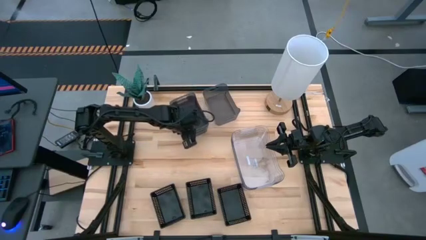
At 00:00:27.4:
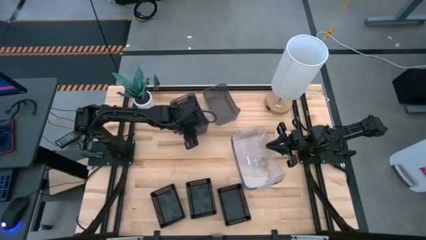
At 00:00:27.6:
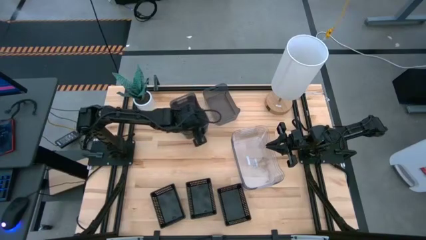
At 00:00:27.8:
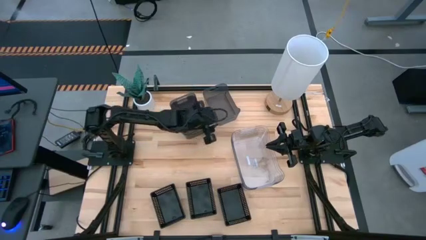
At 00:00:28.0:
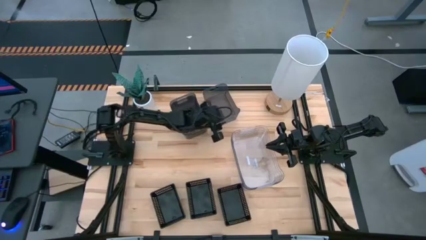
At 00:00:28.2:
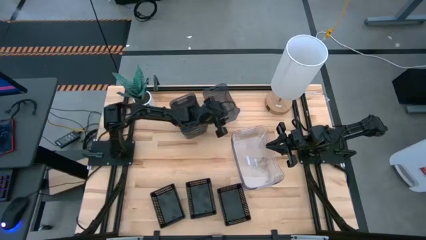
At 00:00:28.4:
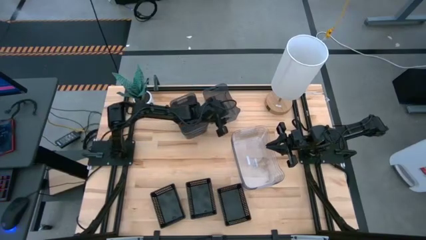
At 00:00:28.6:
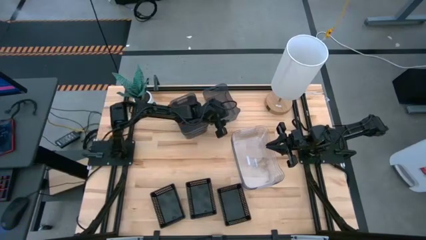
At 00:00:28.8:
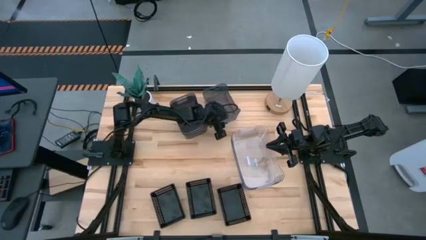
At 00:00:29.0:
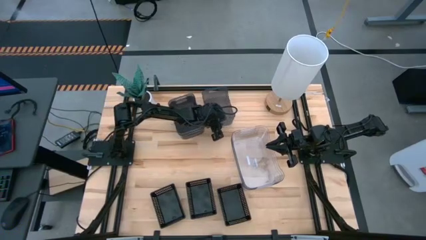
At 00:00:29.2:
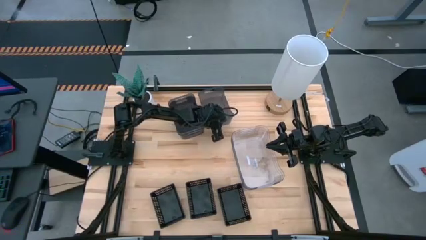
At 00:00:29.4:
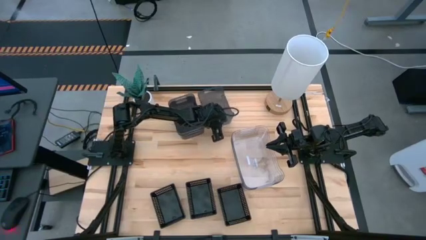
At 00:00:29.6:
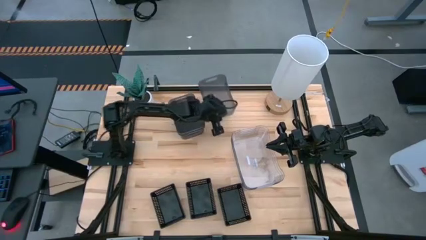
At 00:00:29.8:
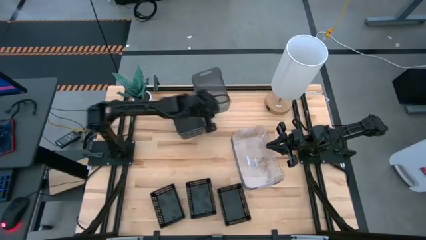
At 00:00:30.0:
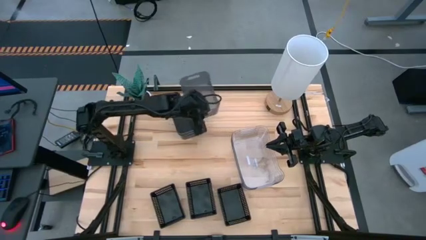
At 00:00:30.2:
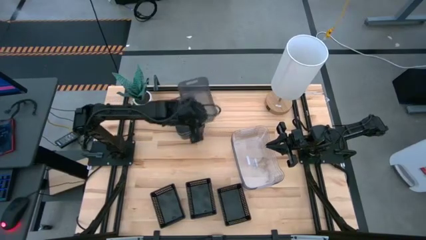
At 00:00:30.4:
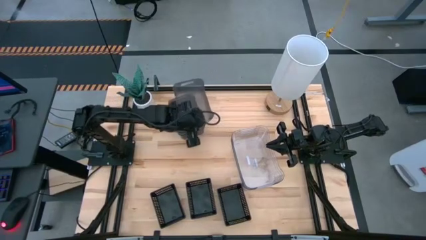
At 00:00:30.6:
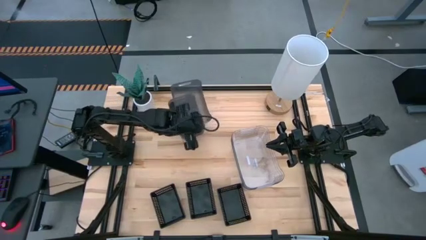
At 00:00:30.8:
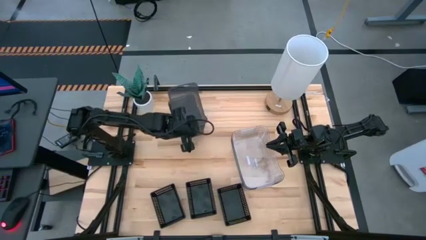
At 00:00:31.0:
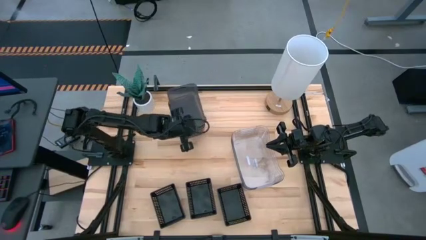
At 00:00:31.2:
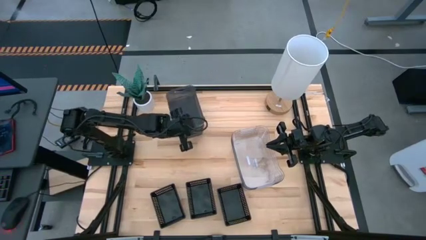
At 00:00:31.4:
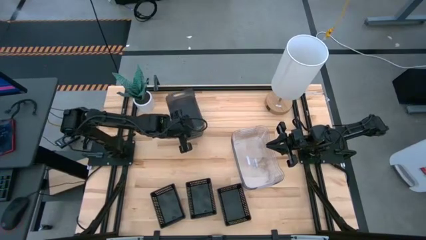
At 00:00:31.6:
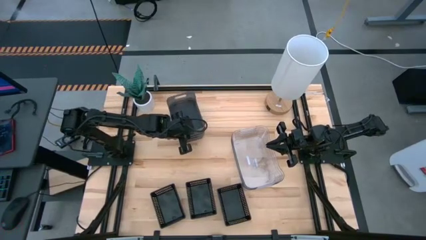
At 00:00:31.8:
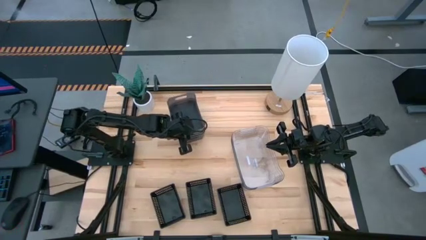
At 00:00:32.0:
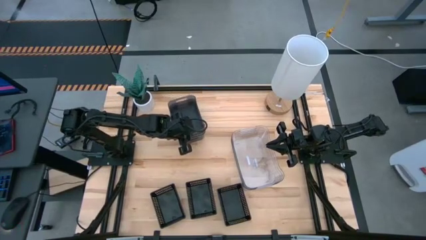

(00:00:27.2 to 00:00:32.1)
Stack the right gray bin on the left gray bin

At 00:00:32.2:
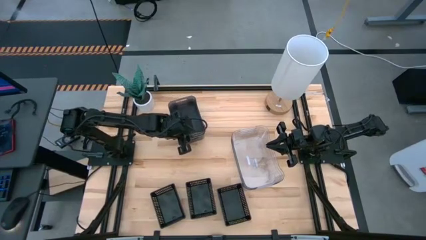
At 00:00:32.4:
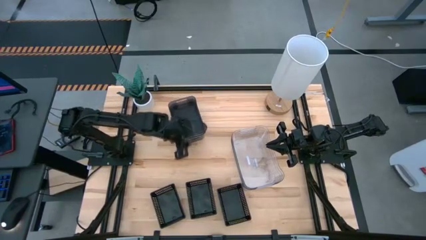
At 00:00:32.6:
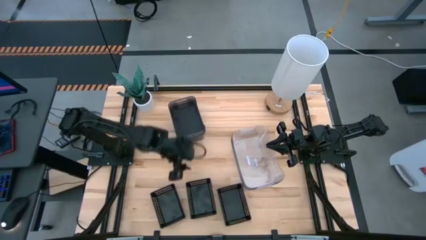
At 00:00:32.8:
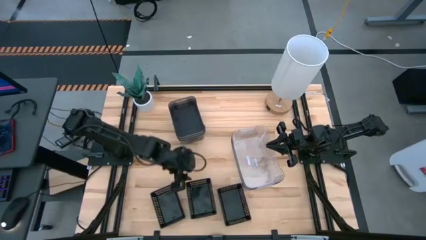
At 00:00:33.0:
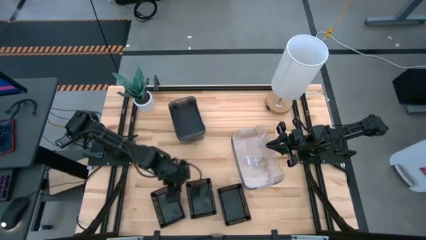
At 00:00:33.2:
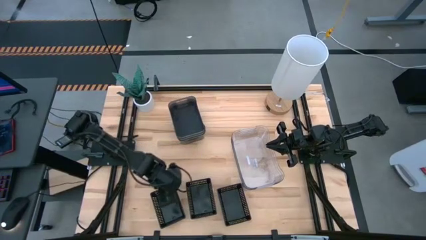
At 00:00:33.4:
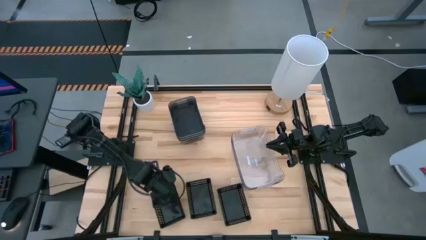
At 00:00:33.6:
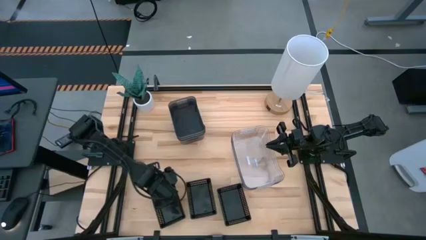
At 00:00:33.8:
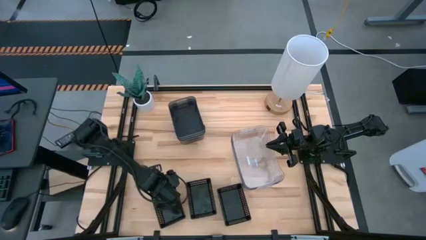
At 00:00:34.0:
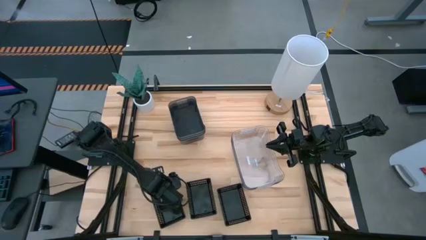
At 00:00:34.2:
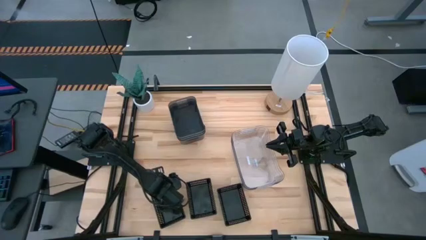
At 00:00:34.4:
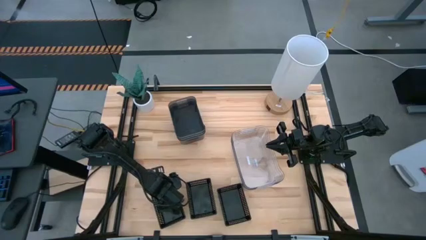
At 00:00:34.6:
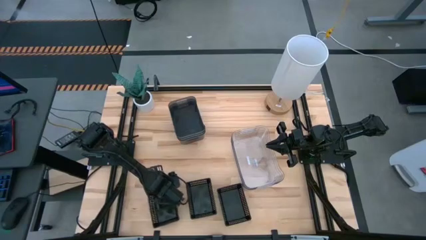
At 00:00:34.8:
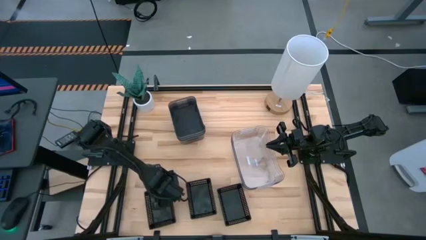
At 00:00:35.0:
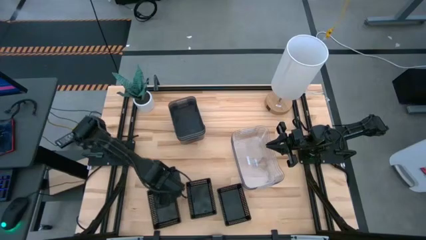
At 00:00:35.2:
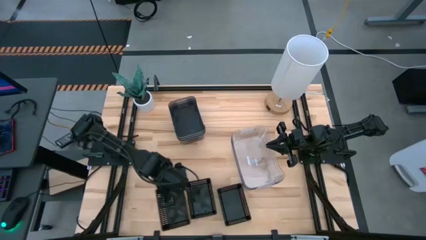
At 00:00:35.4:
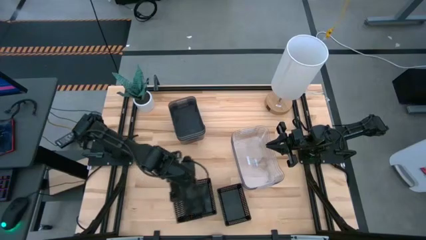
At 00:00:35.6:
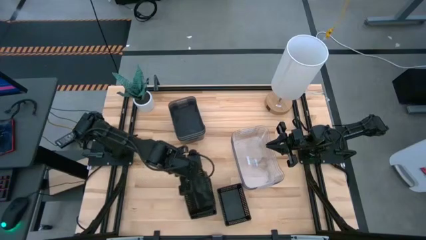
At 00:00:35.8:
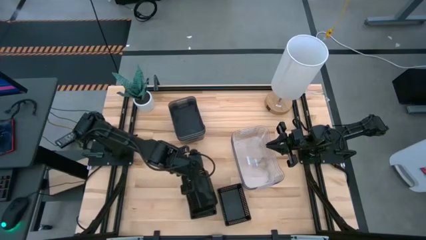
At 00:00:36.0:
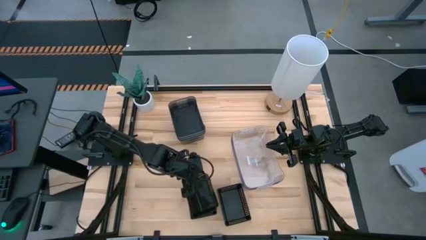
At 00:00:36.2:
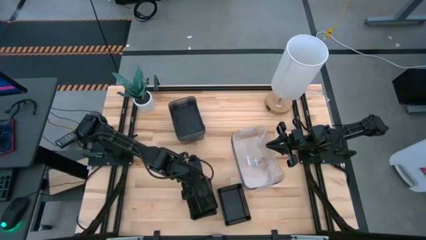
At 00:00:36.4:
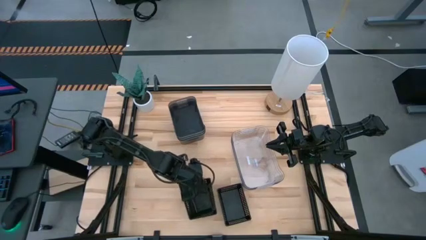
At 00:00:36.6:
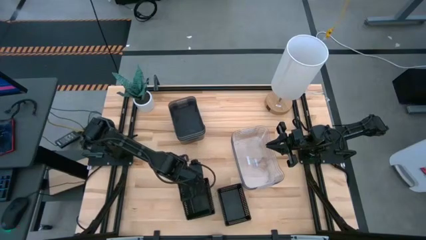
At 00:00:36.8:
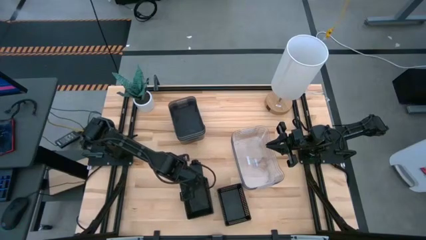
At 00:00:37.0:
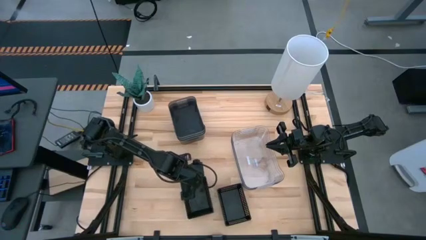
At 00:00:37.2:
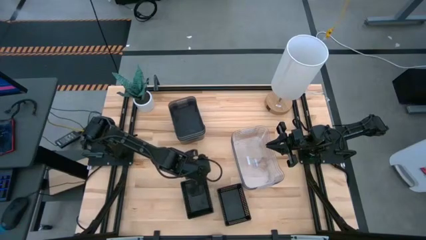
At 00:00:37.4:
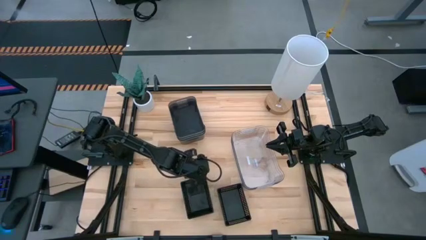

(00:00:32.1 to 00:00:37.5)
Stack the left black bin on the middle black bin

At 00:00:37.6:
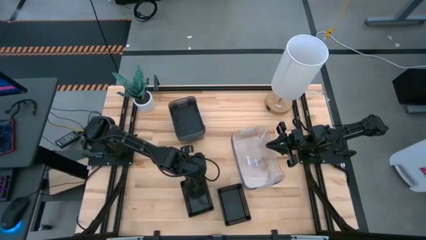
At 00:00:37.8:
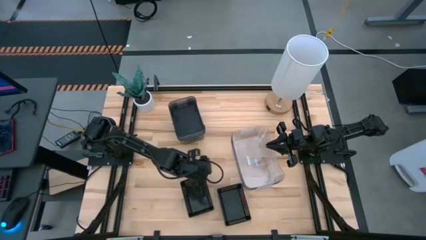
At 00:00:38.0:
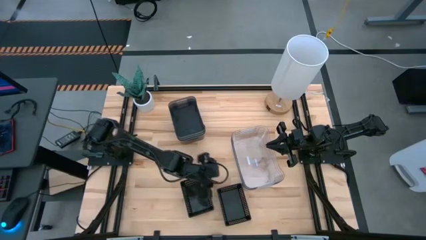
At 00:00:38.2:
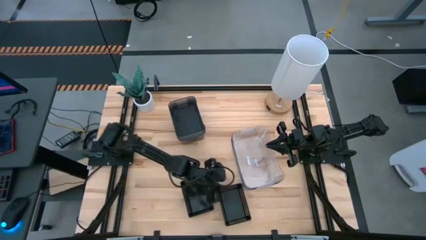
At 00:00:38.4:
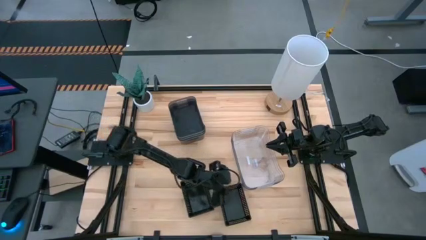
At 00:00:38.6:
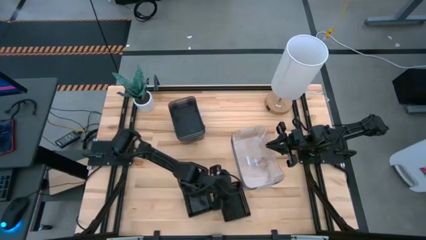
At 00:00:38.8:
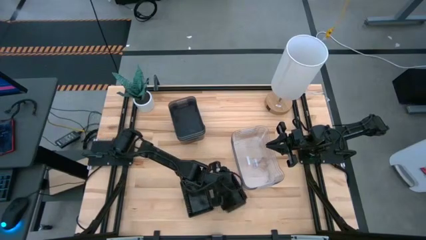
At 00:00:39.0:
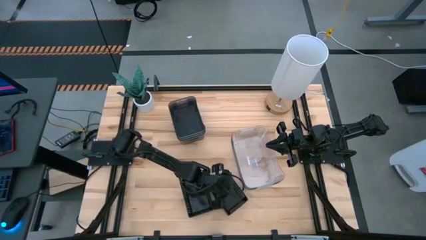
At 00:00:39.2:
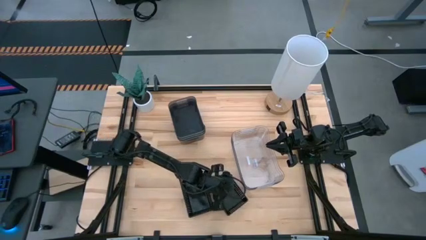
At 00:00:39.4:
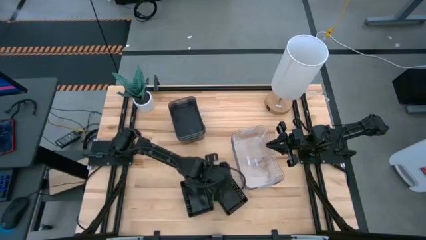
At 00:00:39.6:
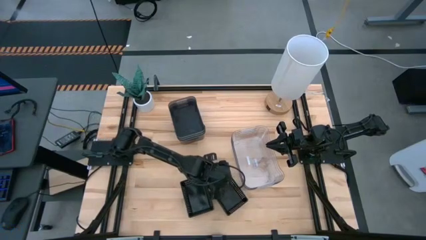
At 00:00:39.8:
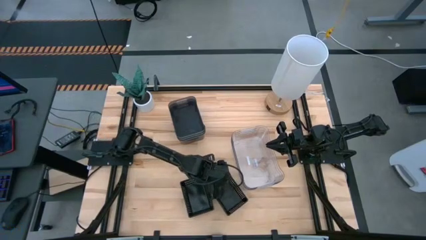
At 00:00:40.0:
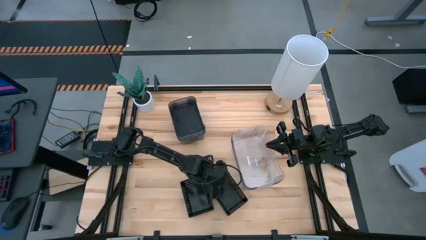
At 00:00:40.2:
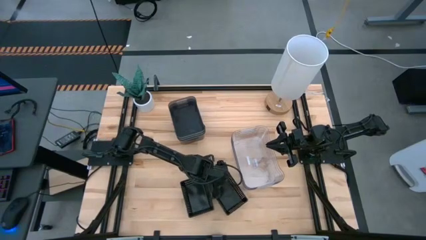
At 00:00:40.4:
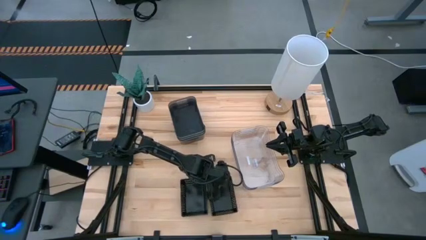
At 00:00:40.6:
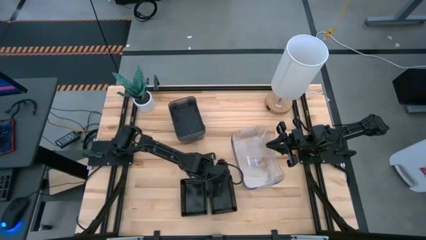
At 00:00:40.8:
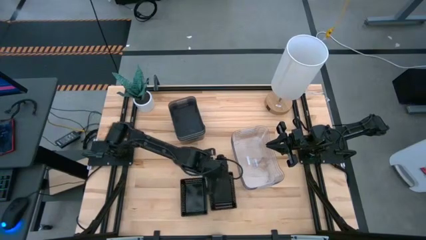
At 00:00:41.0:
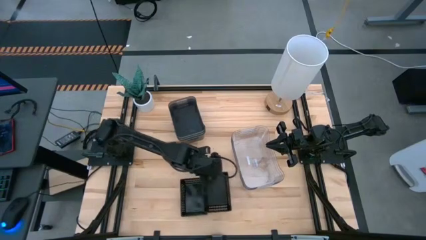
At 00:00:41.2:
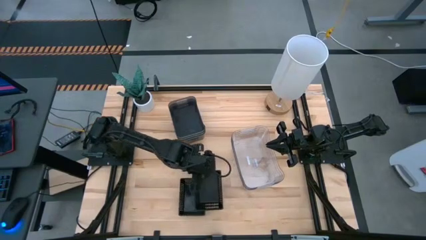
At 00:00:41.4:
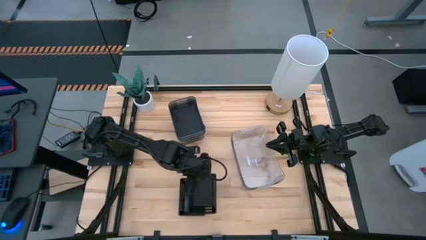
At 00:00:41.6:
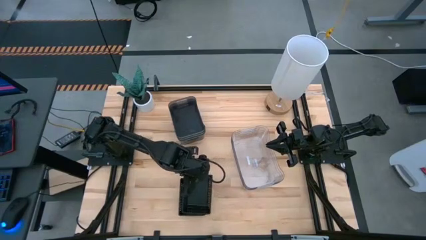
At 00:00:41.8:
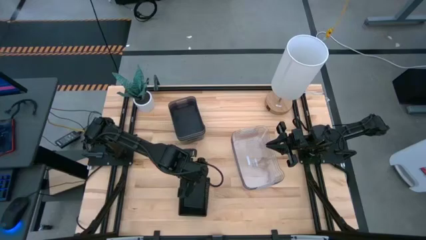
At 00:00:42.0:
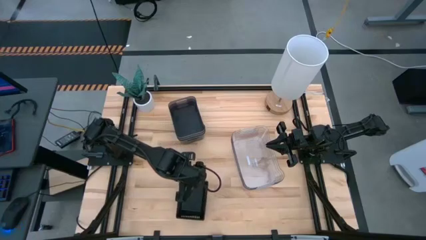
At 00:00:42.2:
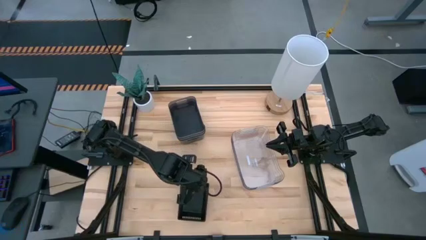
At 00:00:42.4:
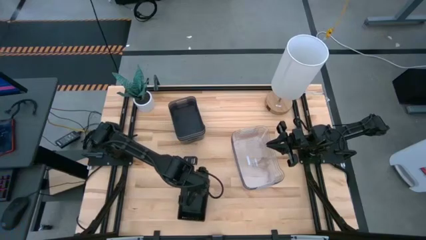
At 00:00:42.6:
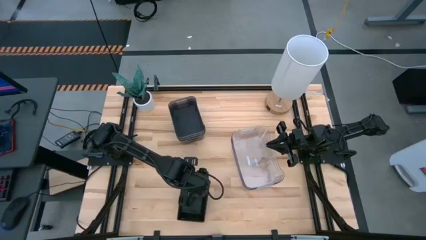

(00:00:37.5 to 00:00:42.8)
Stack the right black bin on the left black bin
